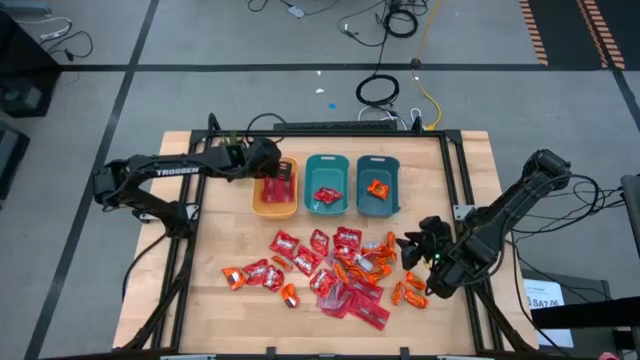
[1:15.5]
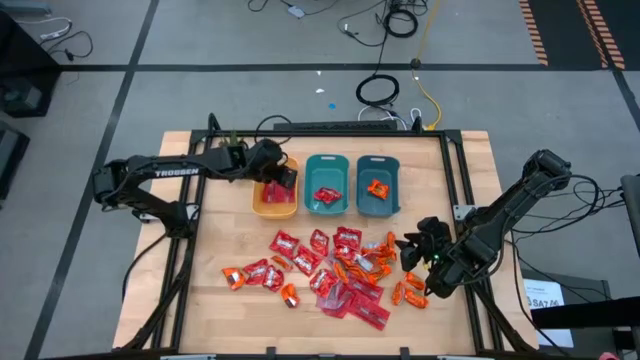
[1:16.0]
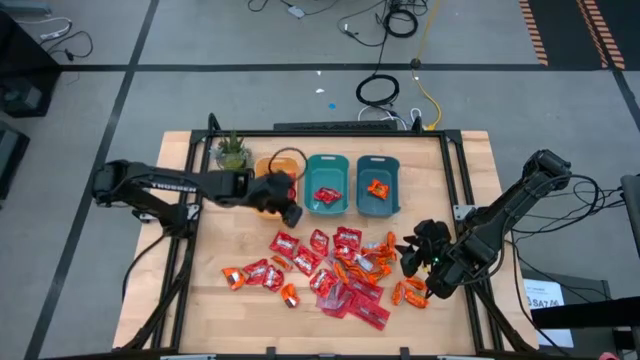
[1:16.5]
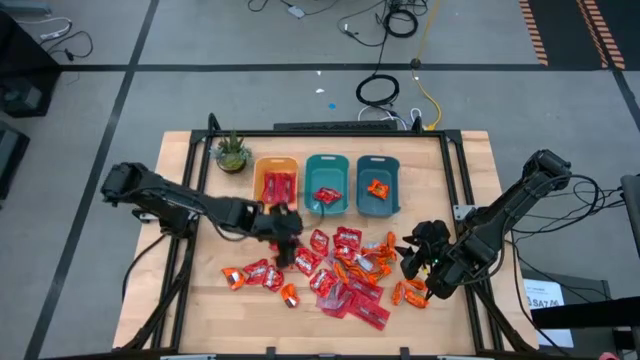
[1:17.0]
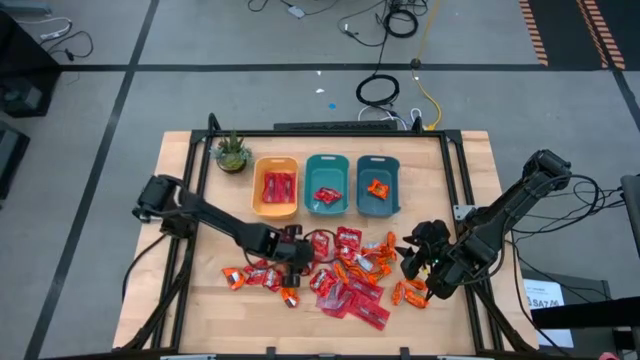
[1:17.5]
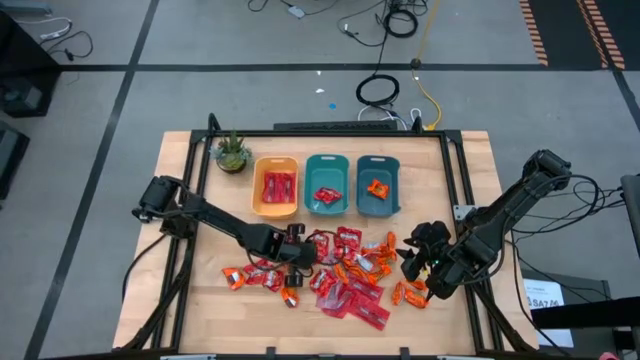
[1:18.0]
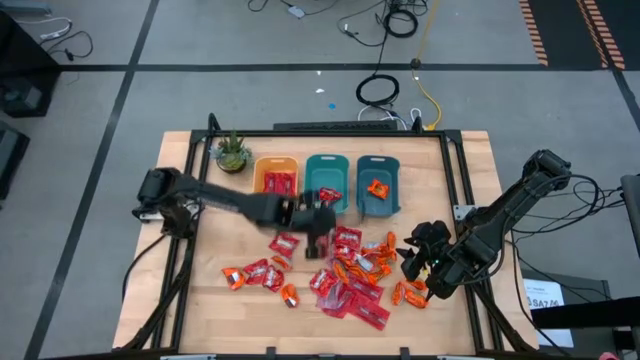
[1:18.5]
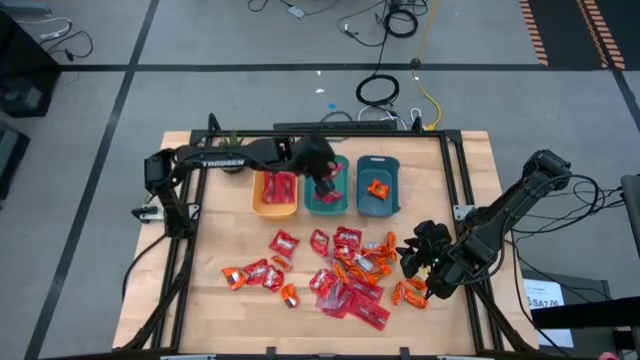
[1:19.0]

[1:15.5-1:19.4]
Task: Sort candy
Put the red candy into the top center green bin

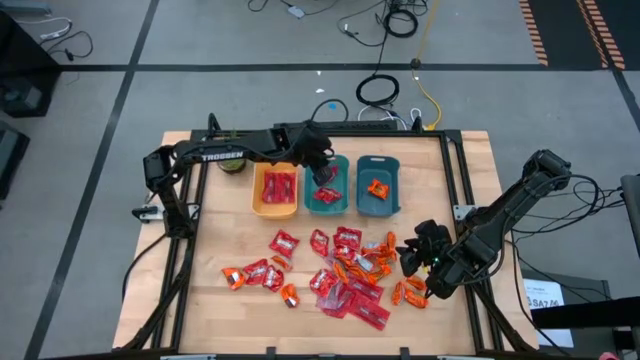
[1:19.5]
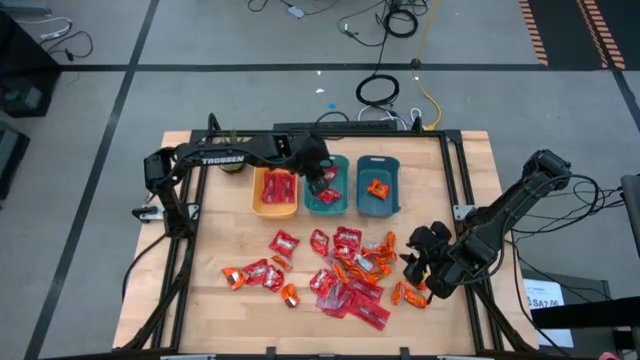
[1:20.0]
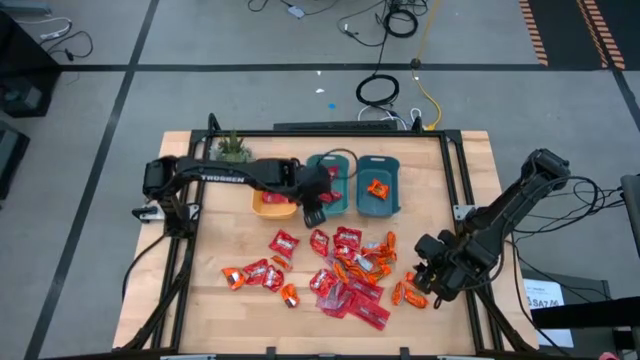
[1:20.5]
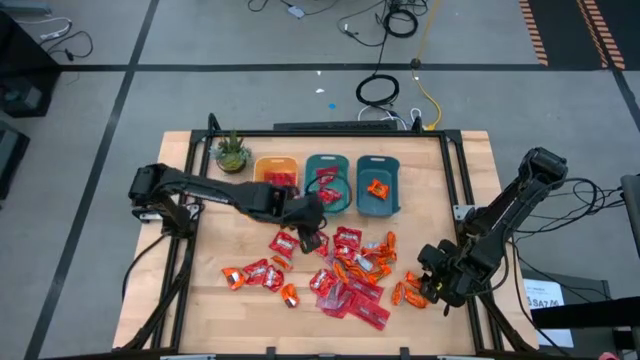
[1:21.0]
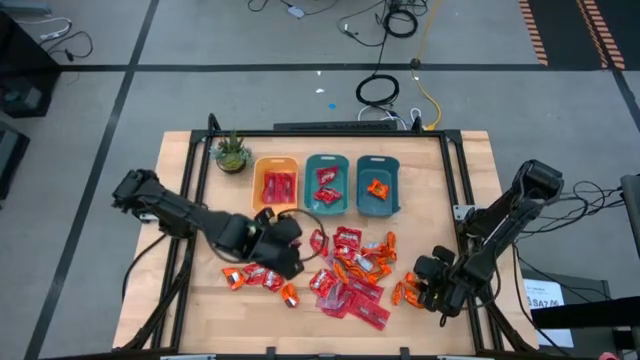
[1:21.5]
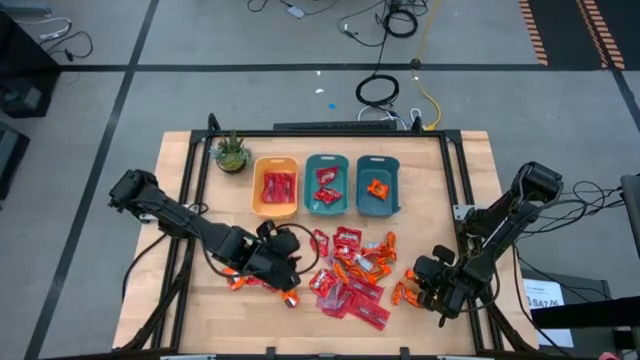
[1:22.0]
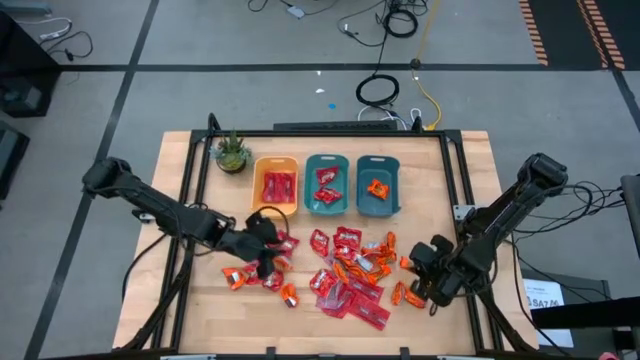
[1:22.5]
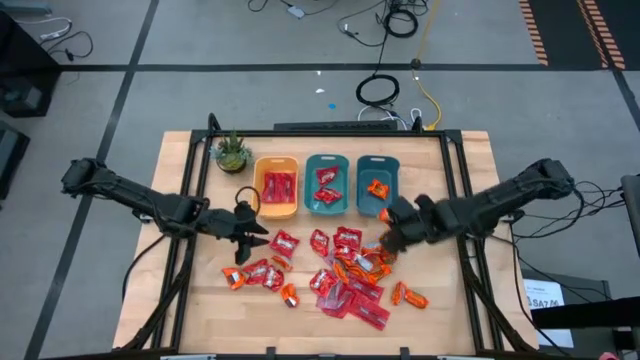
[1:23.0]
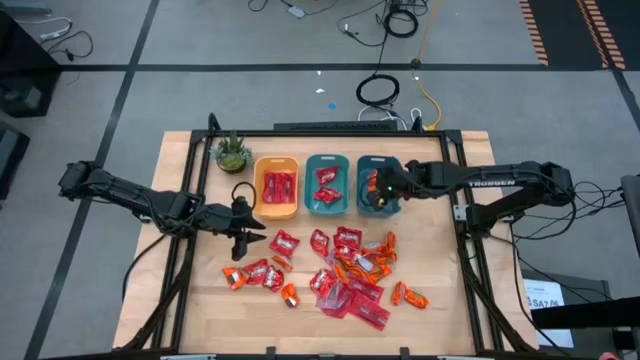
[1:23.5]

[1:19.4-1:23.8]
Put the orange candy into the top right blue bin

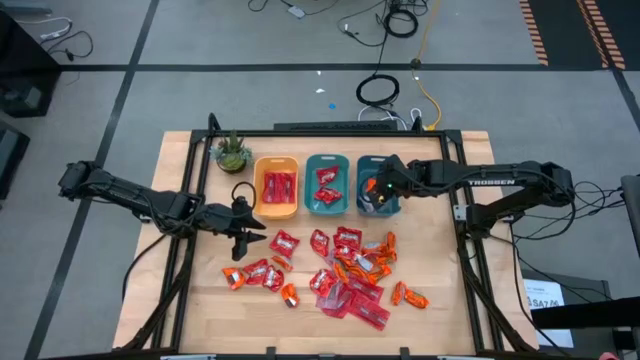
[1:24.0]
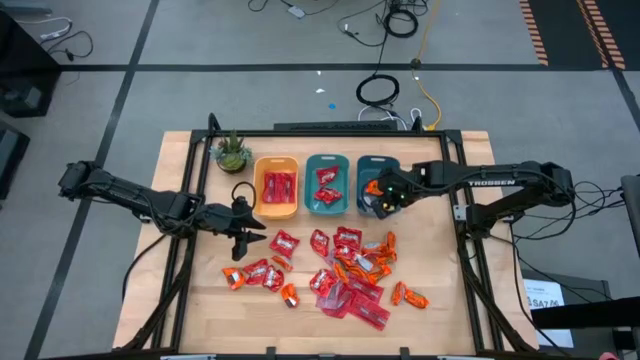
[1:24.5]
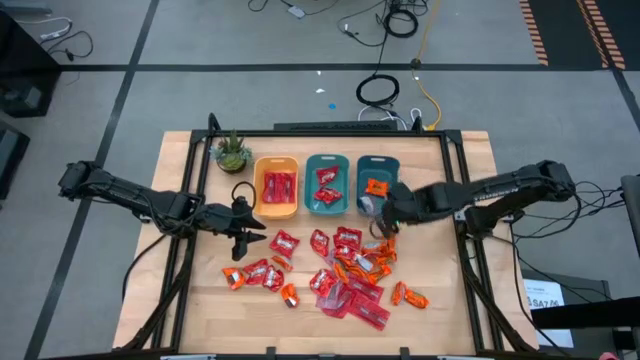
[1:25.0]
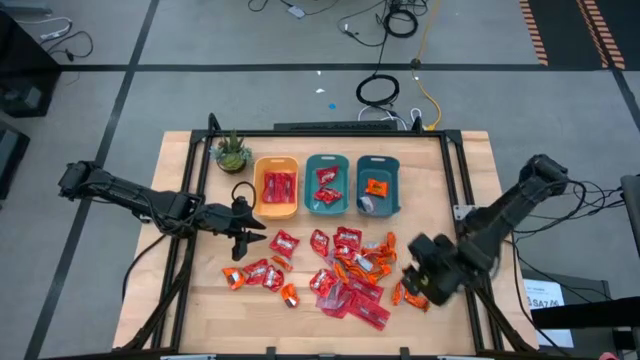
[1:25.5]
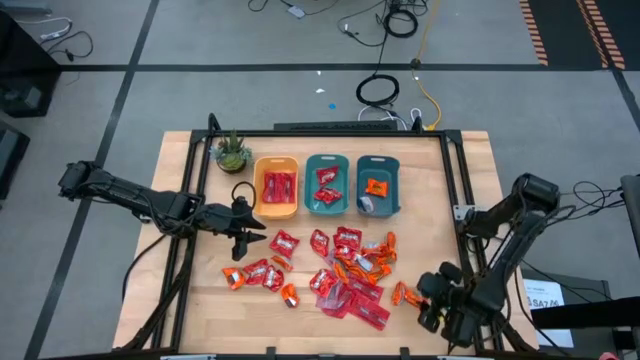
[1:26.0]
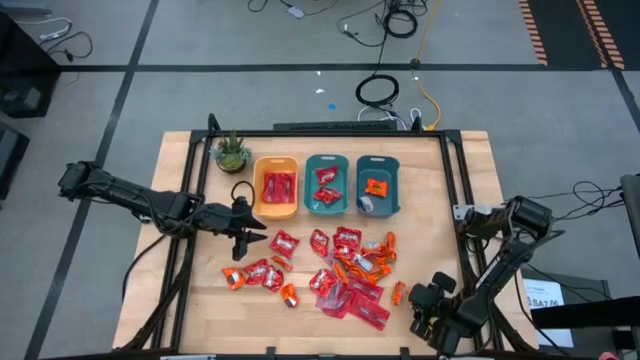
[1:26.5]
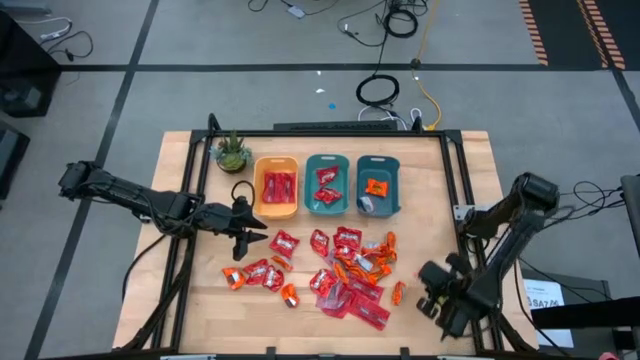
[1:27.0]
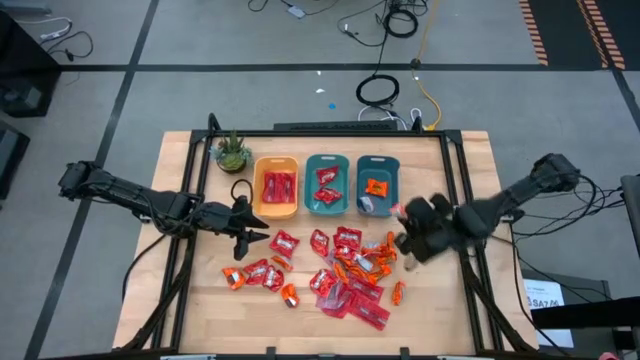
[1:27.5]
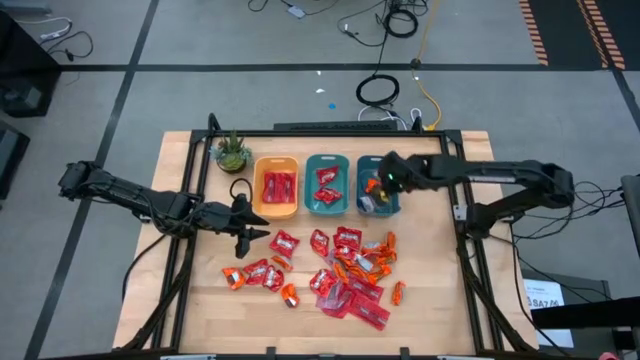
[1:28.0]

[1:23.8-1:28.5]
Put the orange candy into the top right blue bin

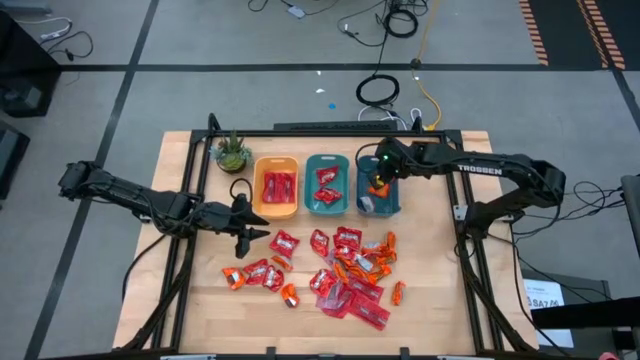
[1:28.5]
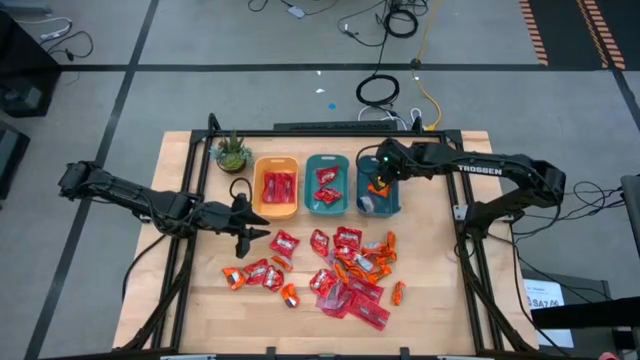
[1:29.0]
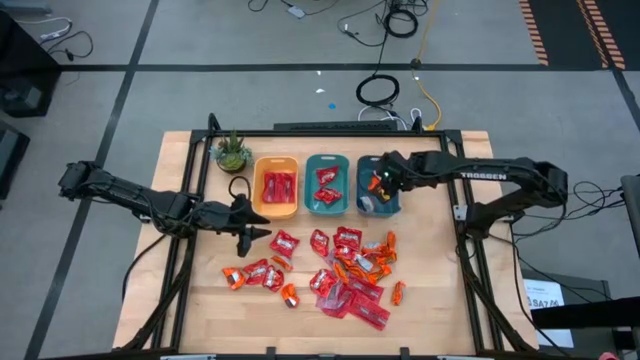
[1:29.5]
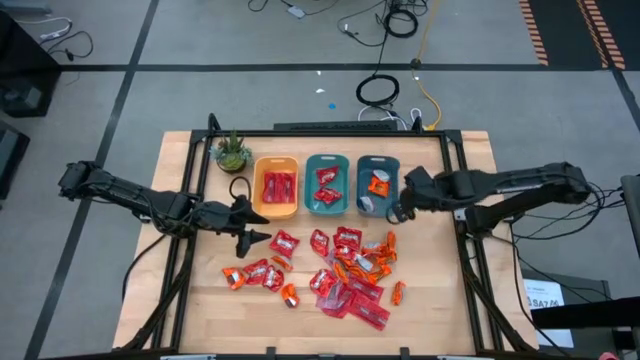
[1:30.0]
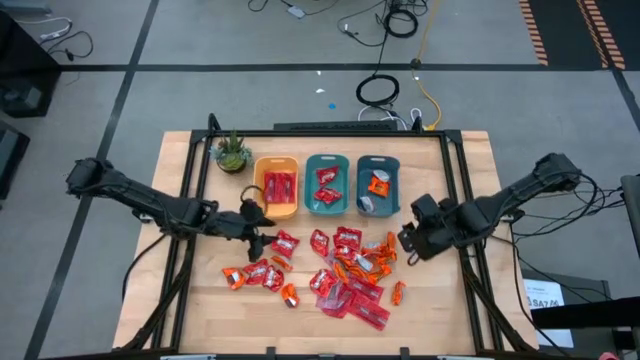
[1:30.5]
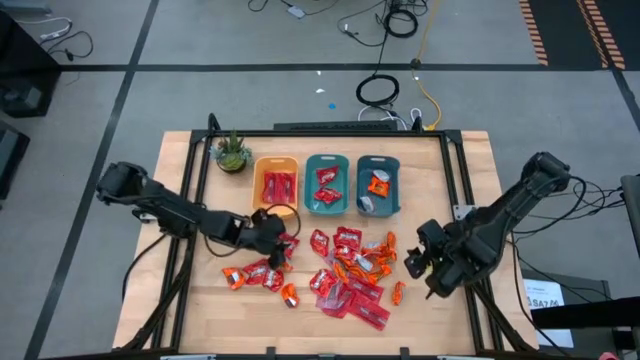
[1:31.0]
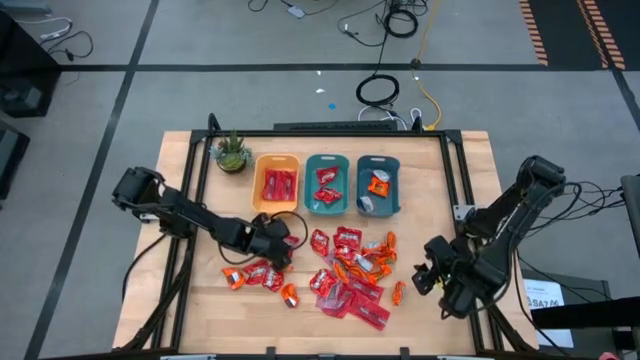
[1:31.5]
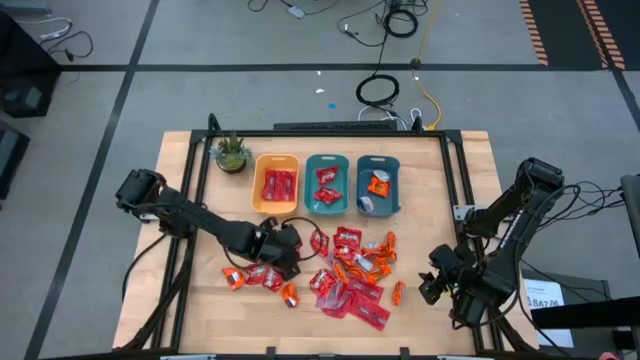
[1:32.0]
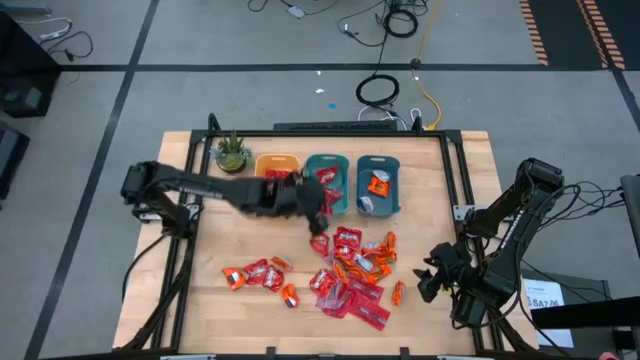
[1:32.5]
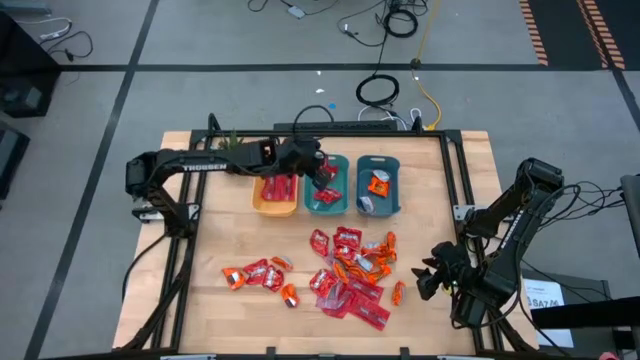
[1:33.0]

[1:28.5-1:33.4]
Put the red candy into the top center green bin

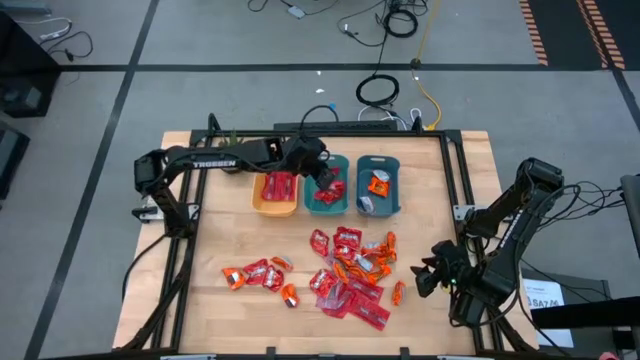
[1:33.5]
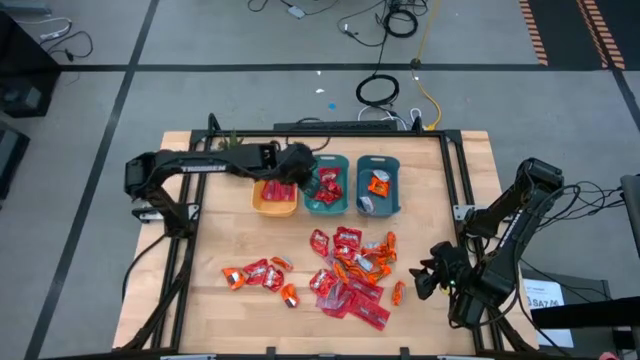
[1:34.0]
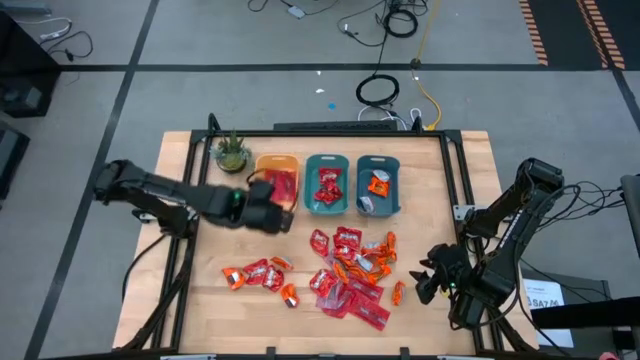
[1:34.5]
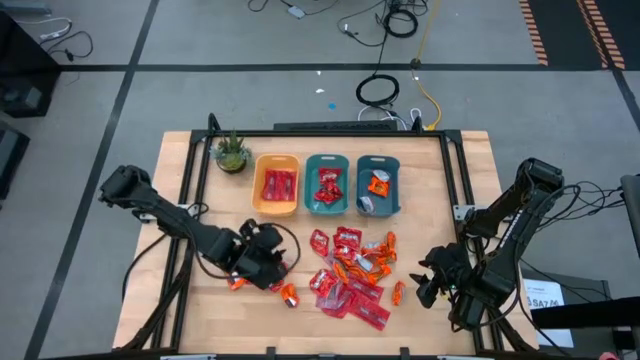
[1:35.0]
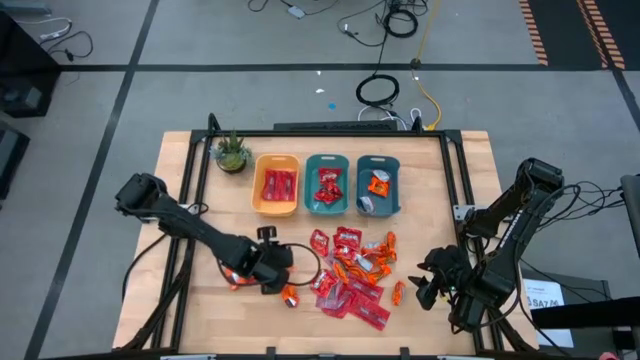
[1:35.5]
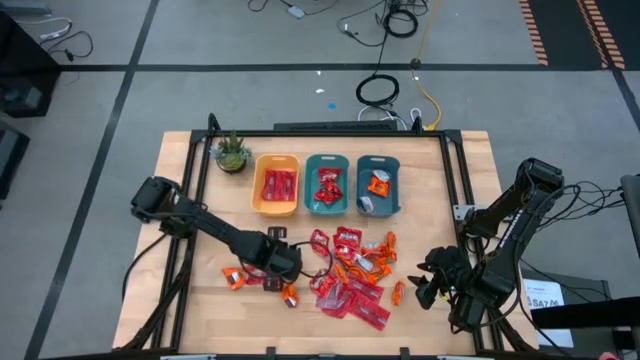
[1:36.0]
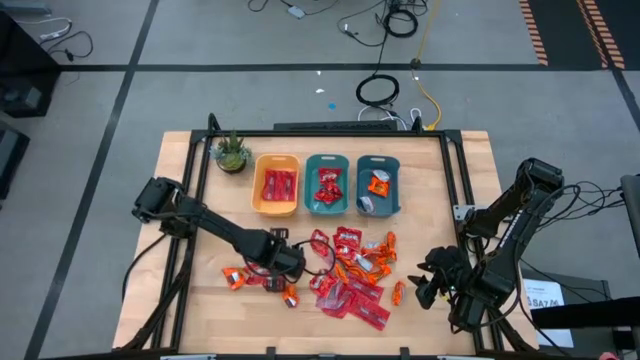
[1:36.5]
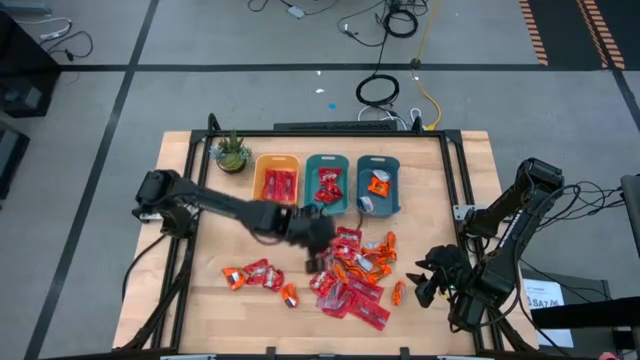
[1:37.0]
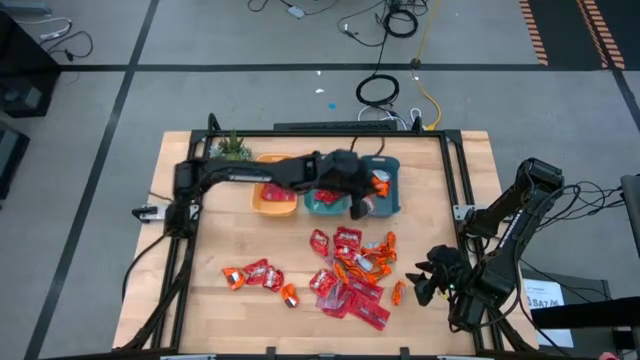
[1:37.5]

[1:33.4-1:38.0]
Put the orange candy into the top right blue bin
